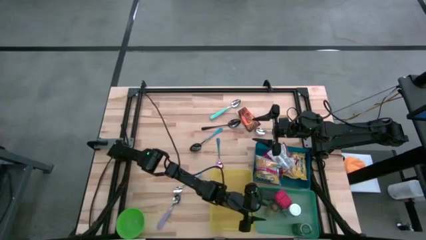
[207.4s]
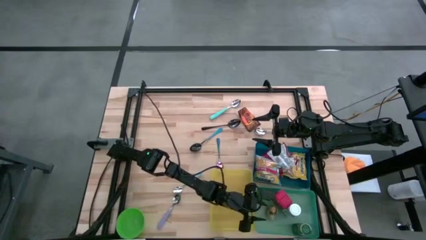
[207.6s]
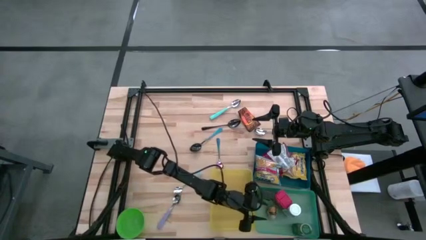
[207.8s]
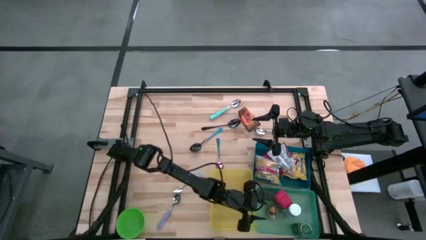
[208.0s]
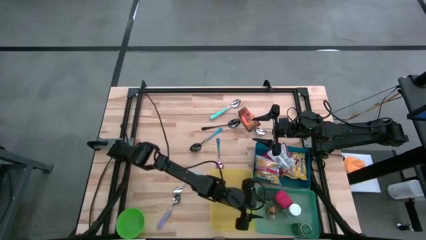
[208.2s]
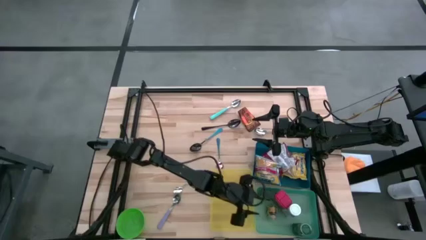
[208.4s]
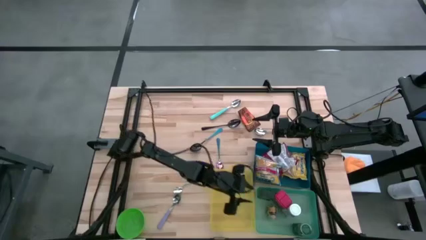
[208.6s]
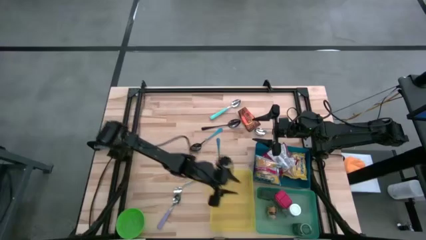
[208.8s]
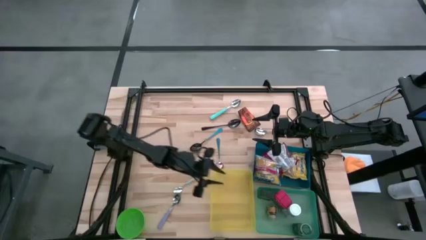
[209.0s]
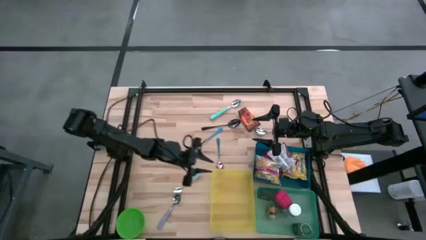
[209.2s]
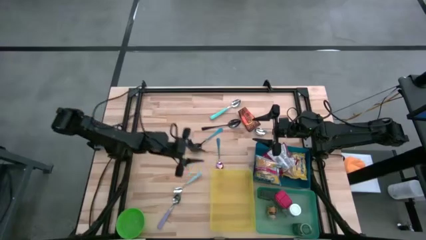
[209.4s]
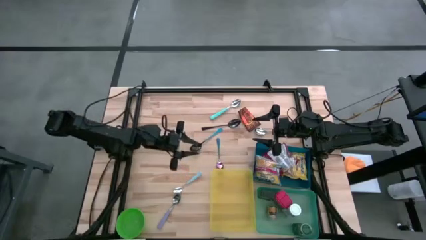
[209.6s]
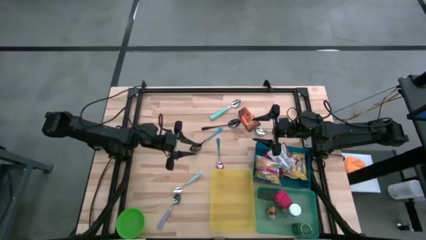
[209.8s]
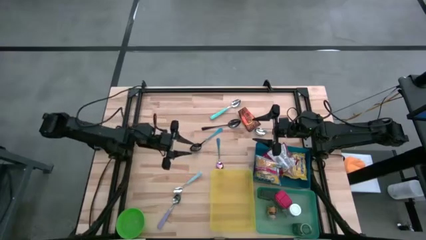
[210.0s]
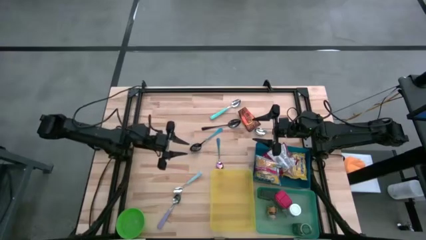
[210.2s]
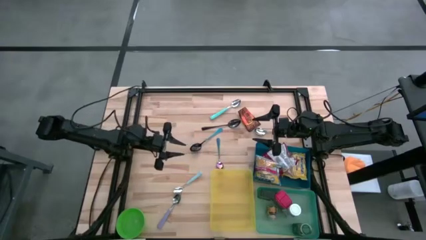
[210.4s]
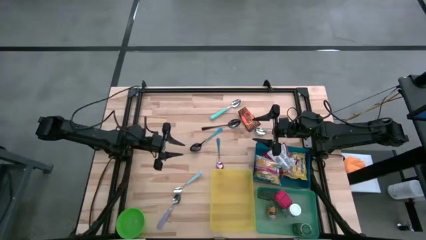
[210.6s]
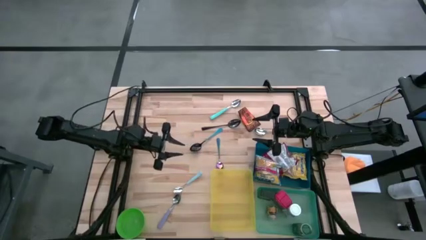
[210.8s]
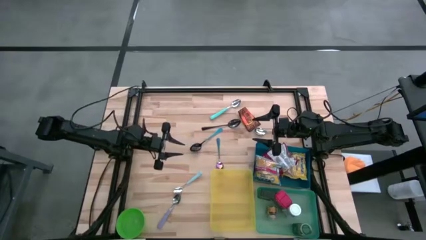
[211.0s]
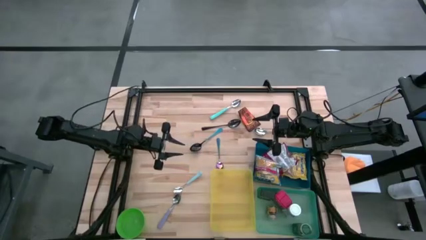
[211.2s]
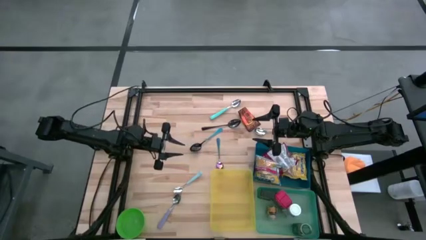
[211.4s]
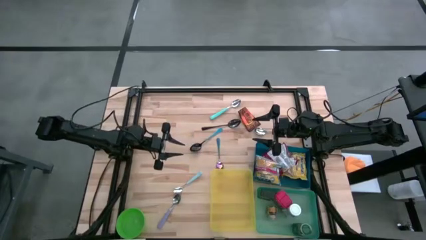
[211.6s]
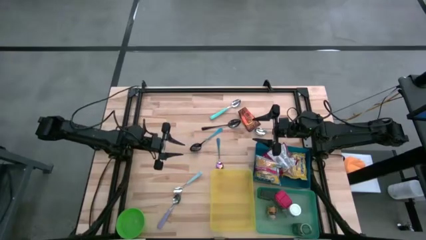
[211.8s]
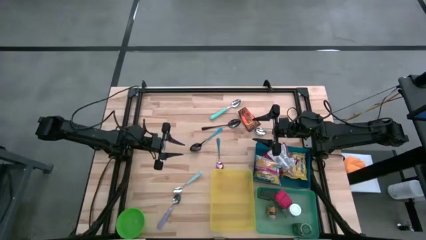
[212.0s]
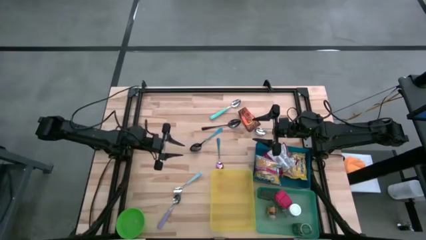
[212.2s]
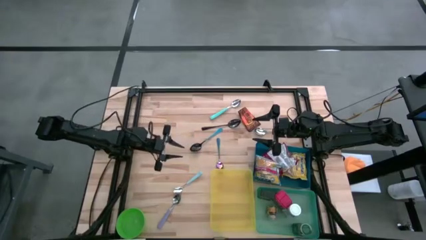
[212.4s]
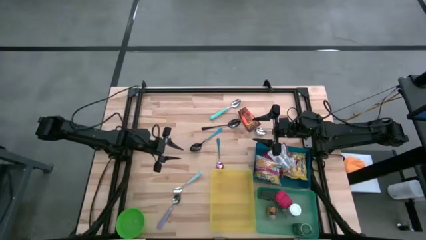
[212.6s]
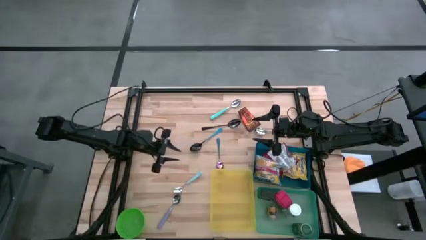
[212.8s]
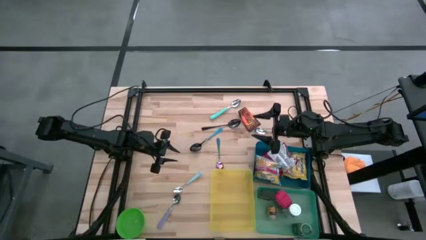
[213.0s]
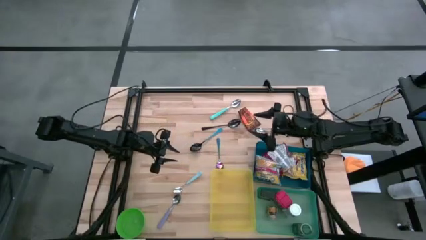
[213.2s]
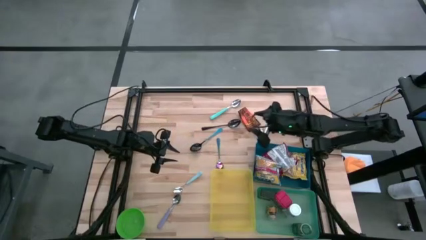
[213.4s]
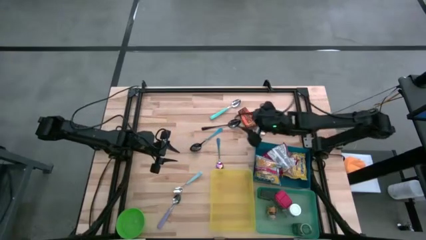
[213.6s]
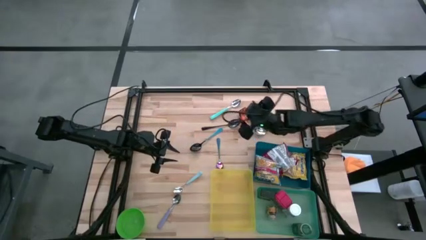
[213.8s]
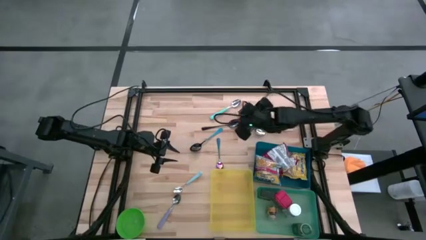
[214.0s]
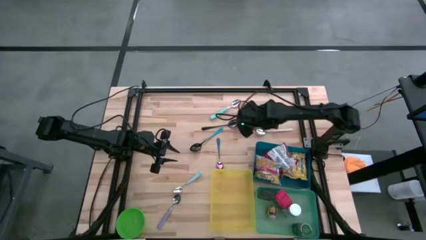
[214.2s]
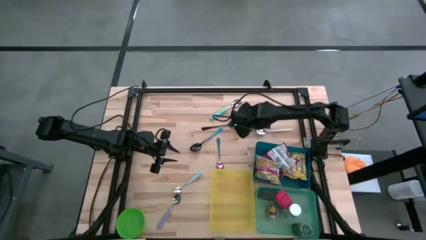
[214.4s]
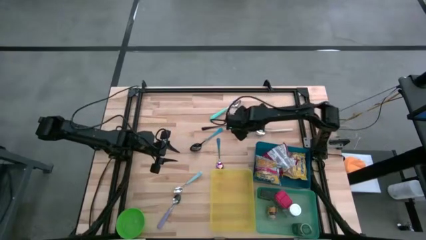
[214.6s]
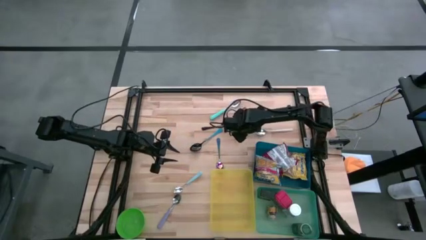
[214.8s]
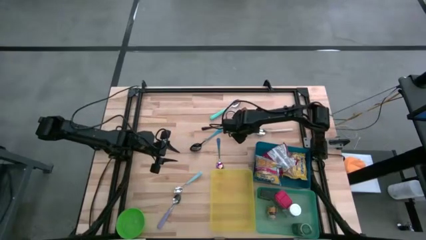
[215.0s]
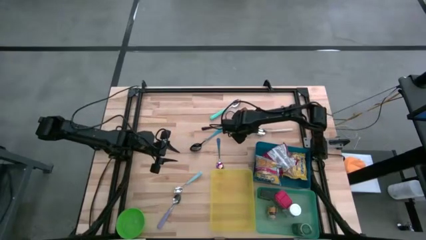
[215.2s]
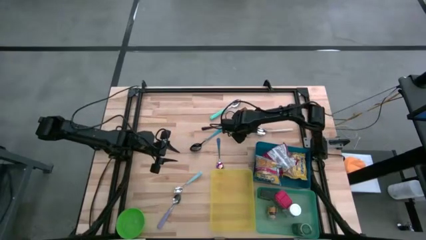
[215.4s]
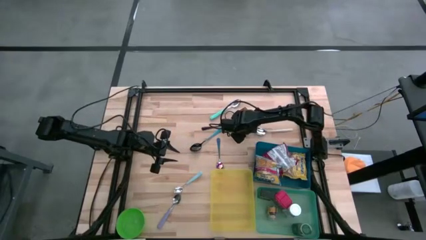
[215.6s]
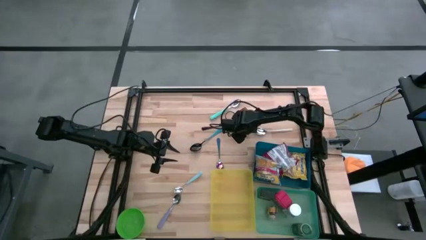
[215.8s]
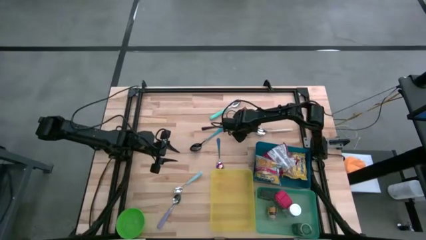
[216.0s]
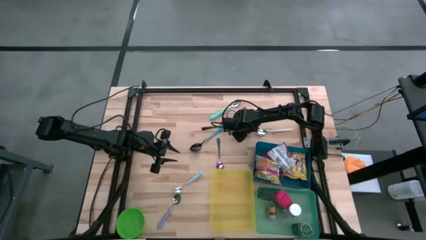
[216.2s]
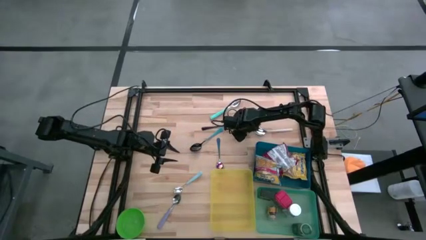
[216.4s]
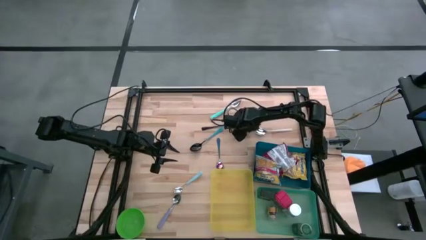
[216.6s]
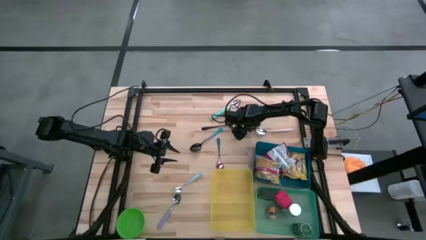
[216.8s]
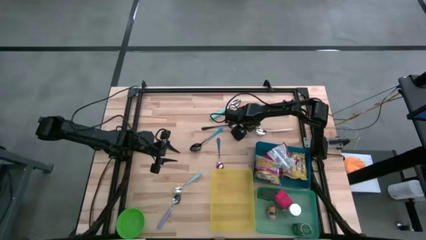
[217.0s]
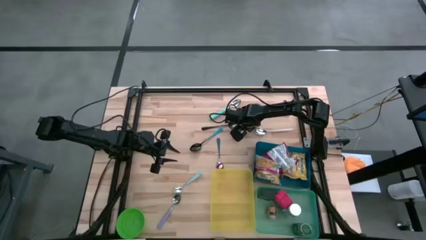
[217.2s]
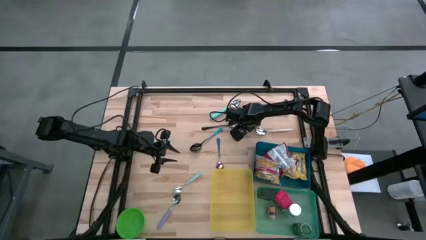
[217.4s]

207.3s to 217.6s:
Put the orange seasoning pack into the green bin
